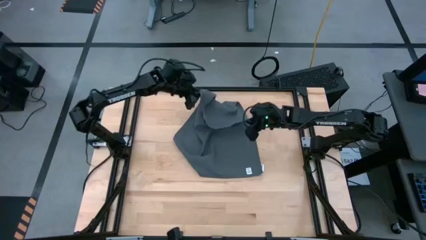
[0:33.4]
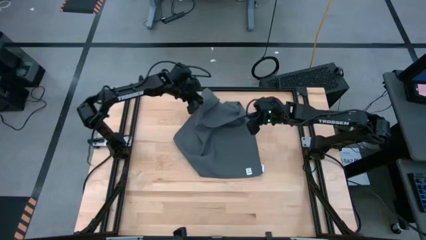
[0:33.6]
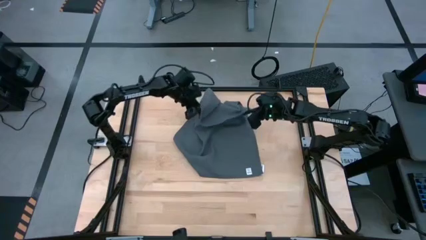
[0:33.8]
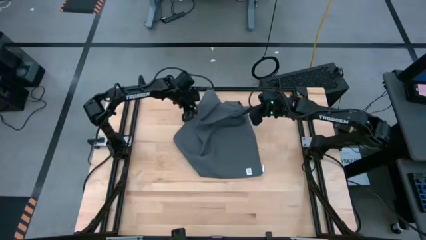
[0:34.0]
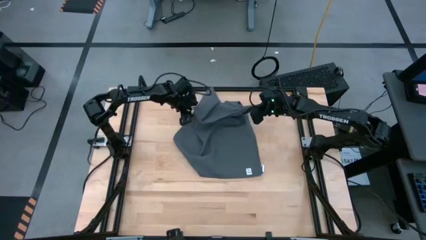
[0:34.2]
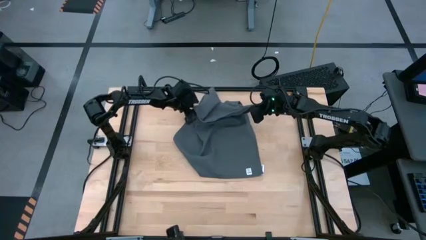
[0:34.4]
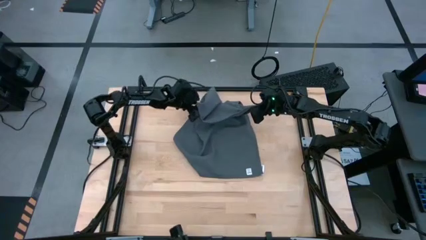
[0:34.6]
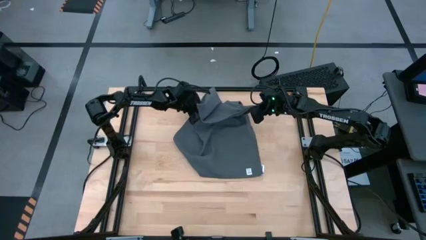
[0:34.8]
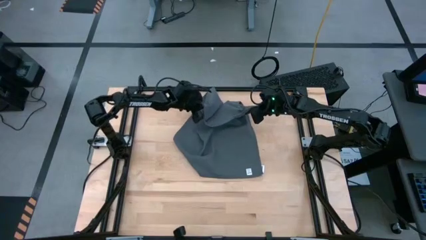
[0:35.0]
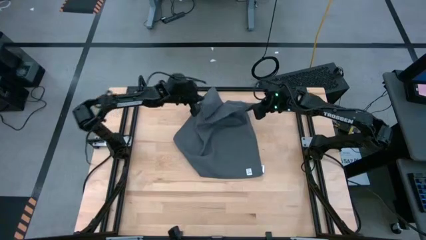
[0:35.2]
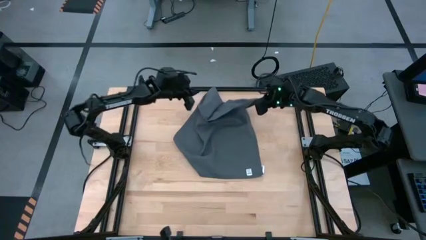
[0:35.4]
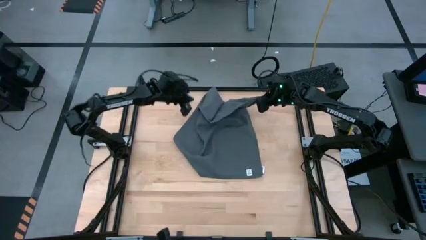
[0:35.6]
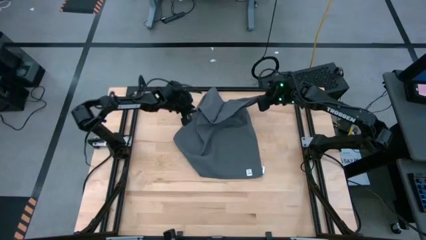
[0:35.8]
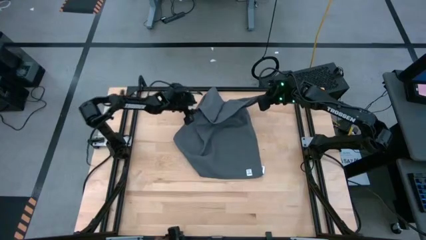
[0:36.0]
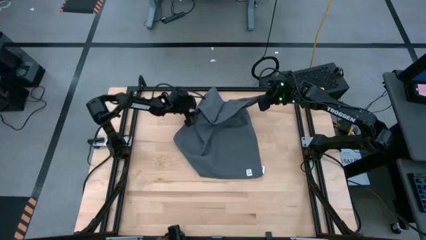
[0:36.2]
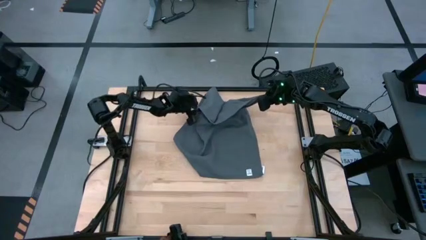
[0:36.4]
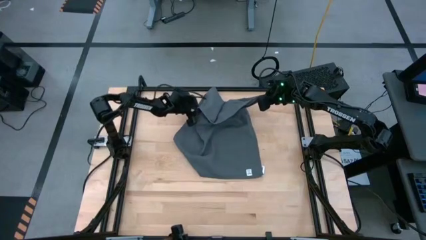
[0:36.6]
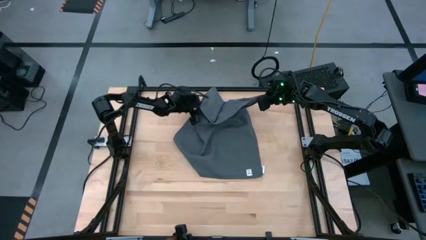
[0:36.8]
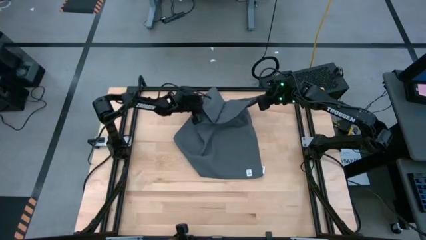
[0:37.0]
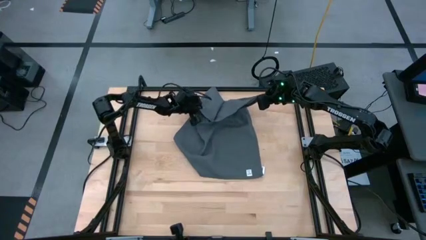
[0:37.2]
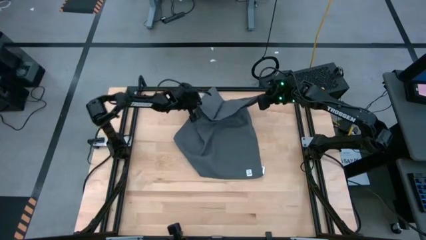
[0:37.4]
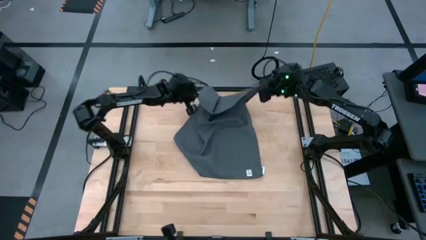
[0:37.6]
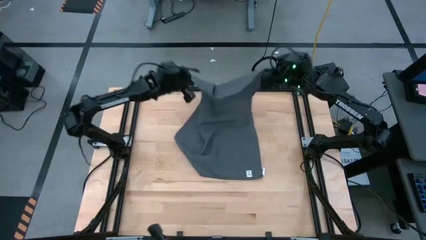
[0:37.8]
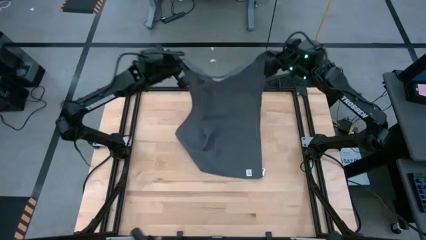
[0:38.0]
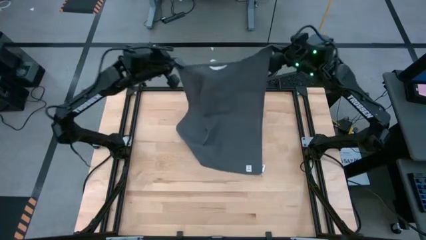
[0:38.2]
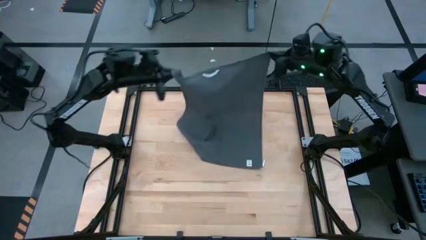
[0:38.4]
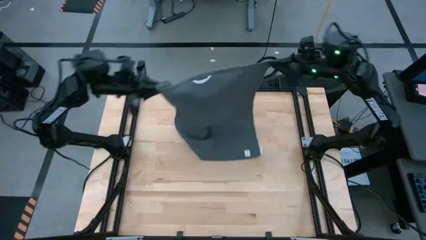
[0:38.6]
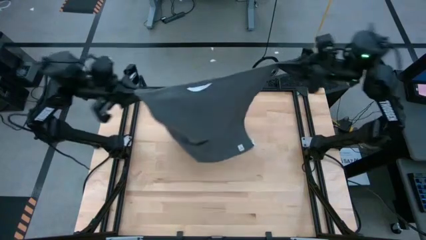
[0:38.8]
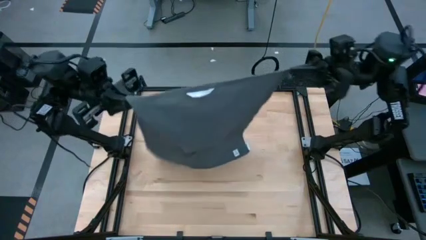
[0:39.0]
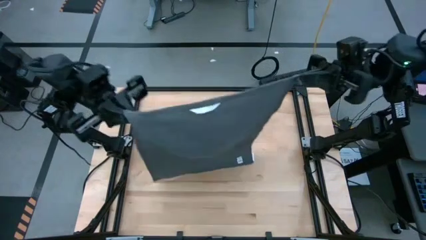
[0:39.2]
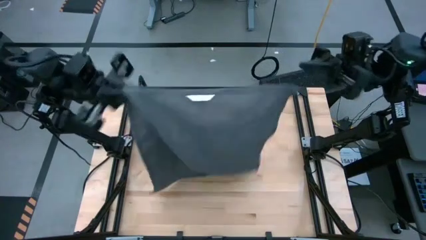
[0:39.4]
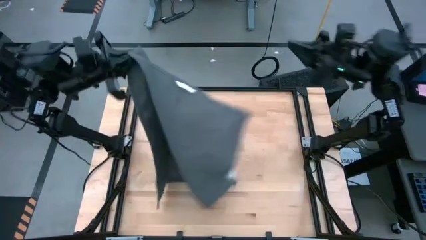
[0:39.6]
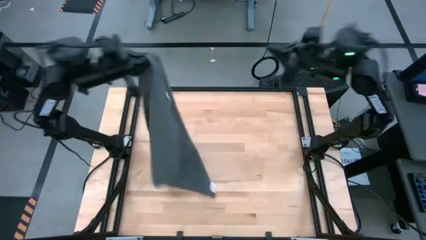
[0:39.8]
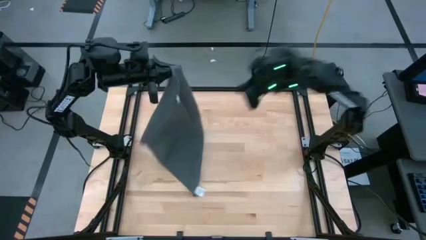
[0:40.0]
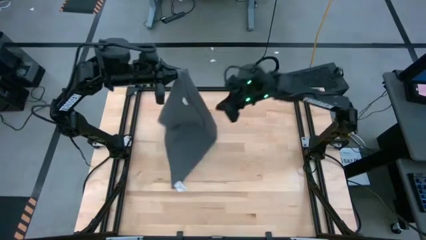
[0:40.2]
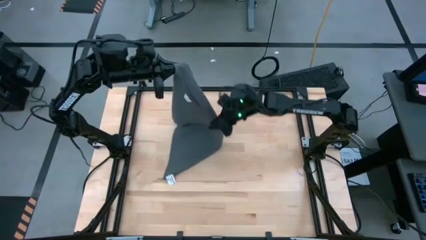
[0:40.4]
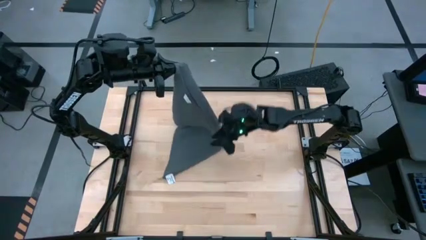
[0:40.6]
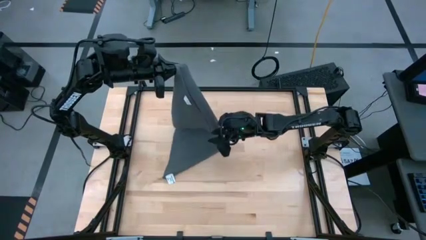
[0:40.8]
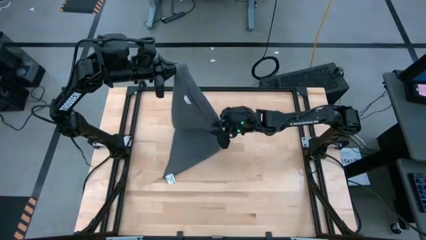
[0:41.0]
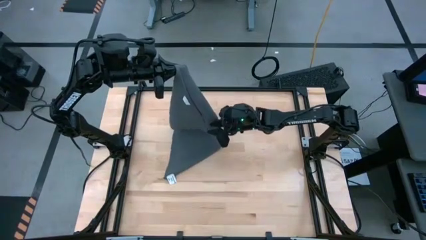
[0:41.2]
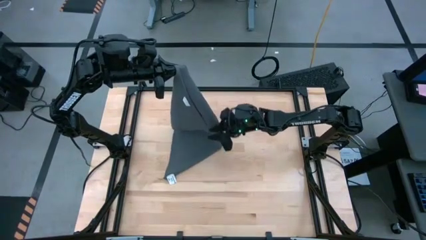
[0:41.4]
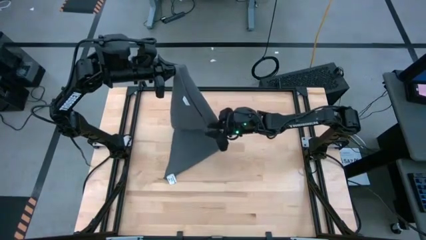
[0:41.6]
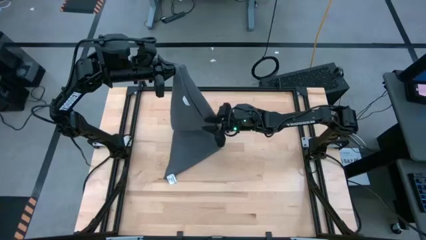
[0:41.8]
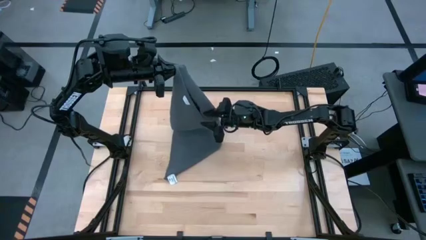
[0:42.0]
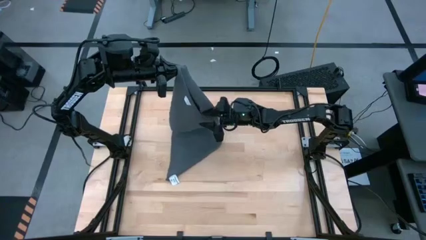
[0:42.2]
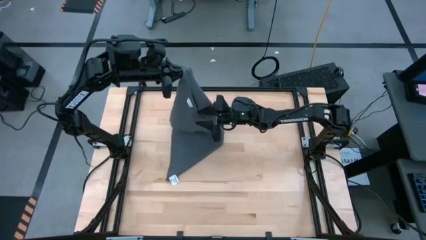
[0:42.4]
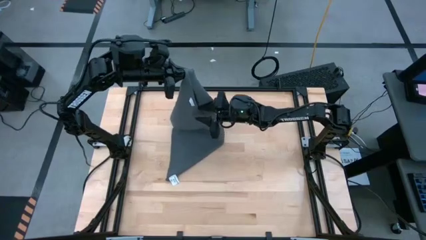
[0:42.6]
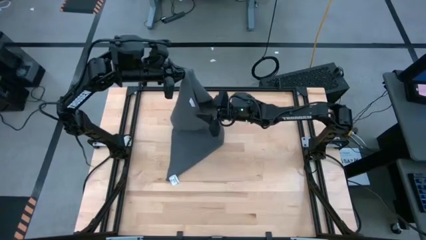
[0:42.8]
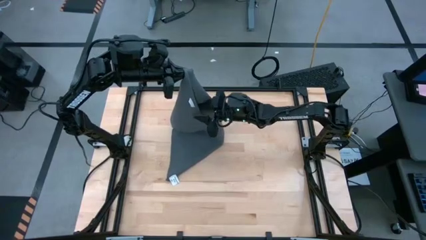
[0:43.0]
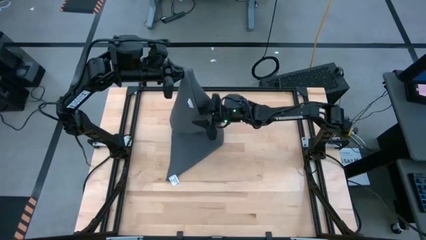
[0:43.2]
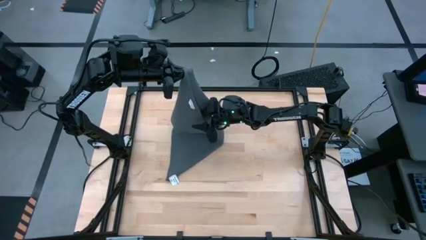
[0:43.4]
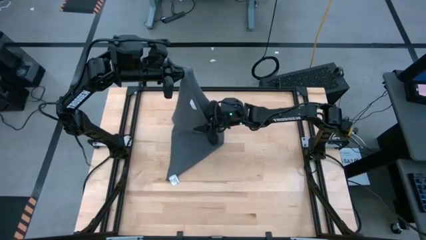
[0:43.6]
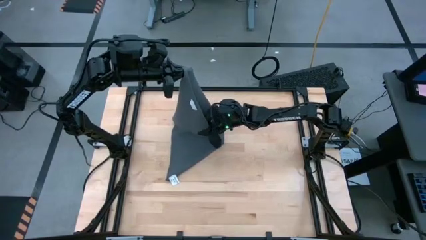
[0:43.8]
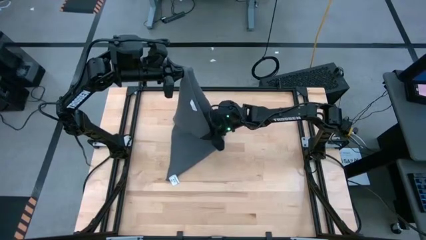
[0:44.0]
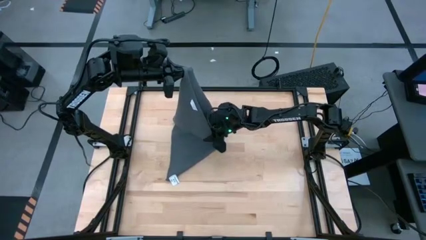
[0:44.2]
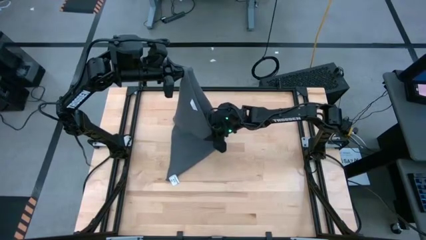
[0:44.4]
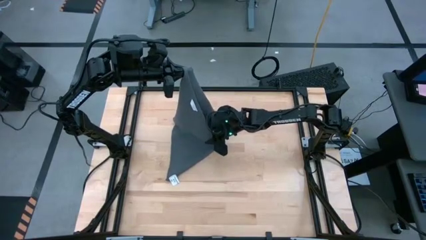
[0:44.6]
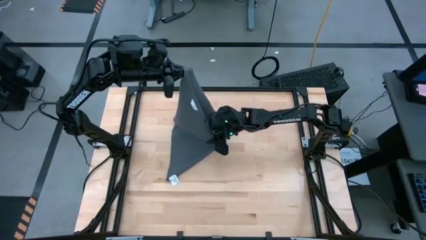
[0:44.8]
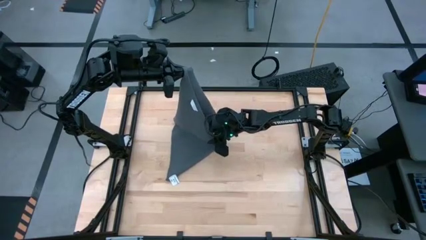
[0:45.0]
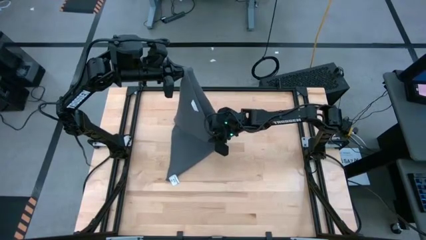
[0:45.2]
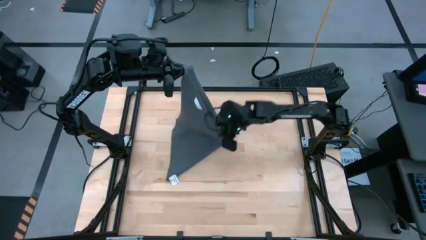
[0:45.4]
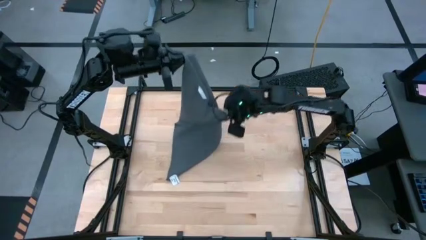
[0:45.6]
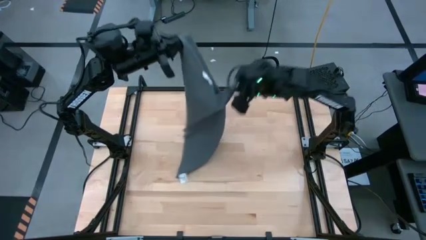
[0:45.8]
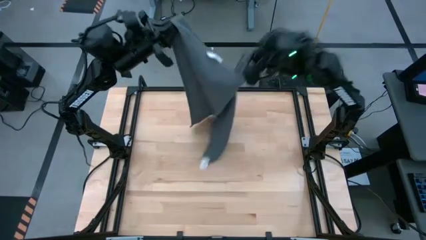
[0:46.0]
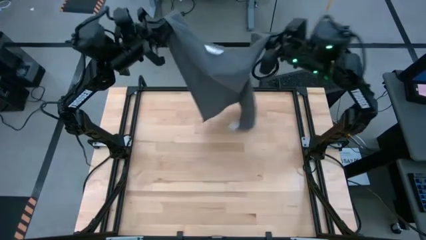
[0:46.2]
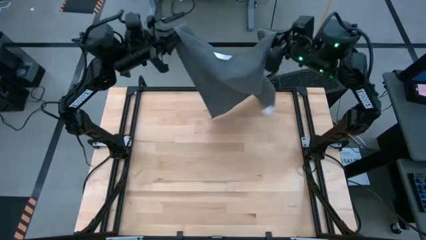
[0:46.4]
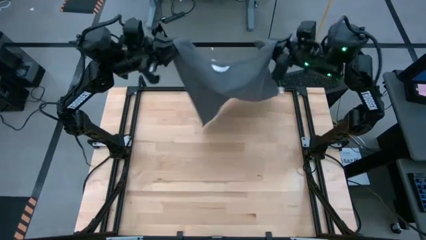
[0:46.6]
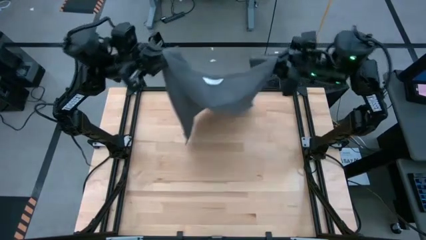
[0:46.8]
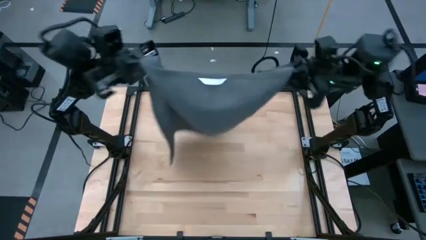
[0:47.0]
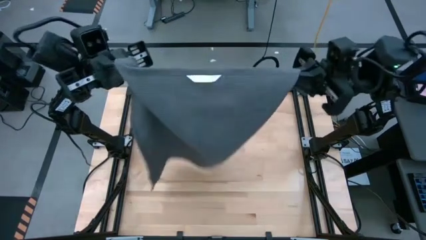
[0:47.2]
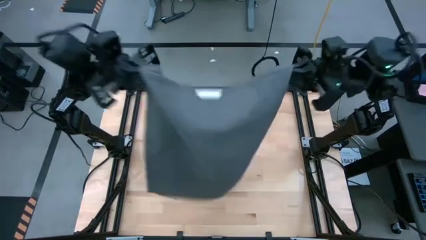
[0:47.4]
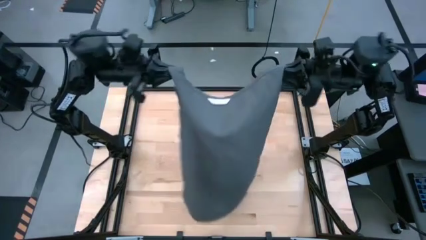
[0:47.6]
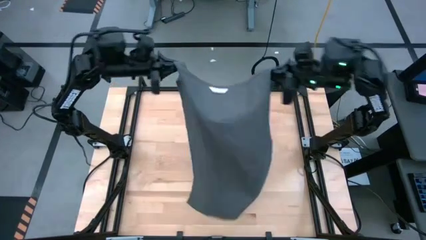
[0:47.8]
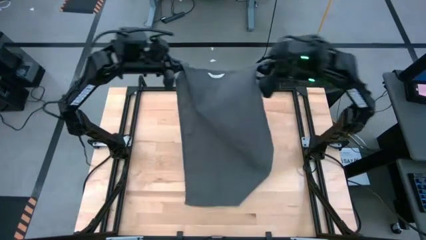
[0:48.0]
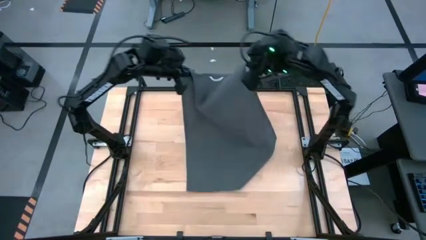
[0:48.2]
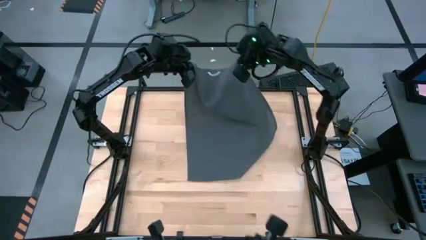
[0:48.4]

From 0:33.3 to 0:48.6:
Task: Roll towel
Fold the gray towel on the center of table
